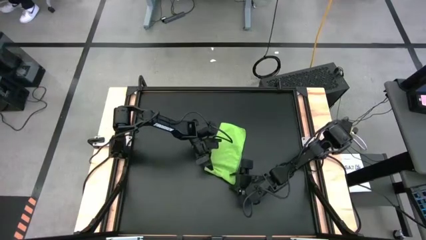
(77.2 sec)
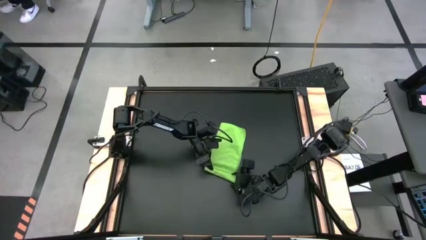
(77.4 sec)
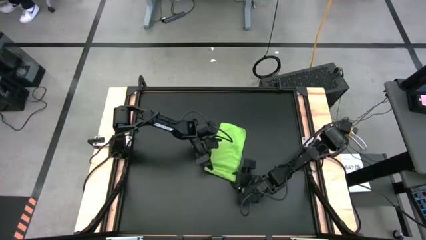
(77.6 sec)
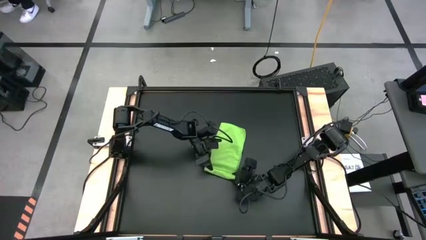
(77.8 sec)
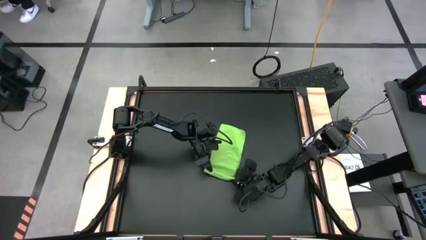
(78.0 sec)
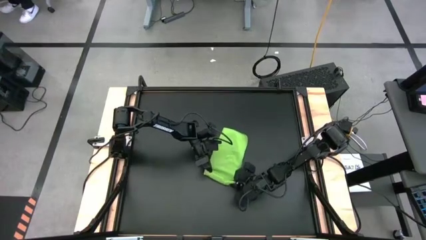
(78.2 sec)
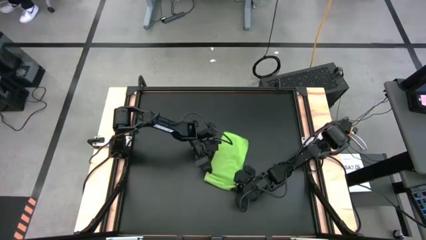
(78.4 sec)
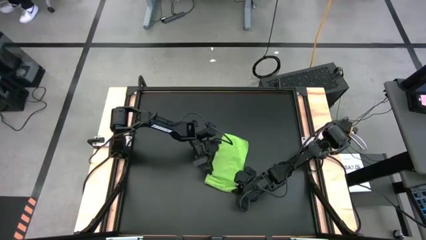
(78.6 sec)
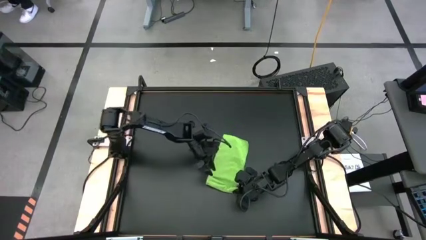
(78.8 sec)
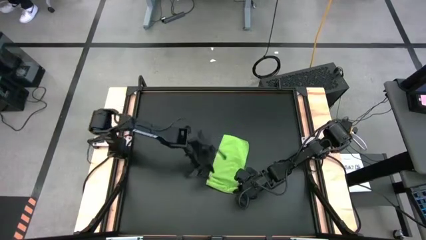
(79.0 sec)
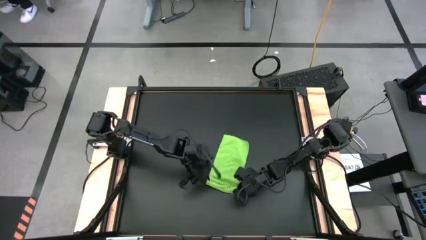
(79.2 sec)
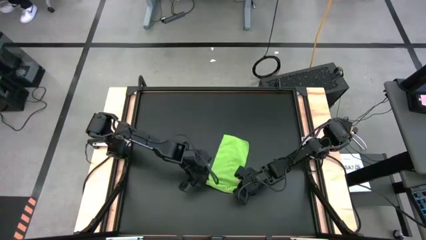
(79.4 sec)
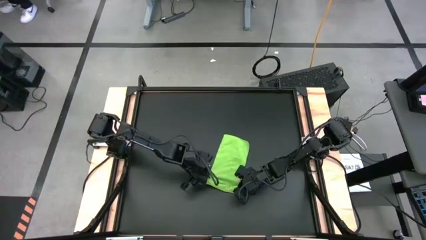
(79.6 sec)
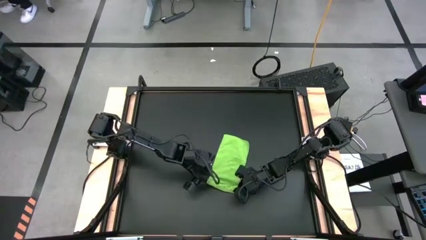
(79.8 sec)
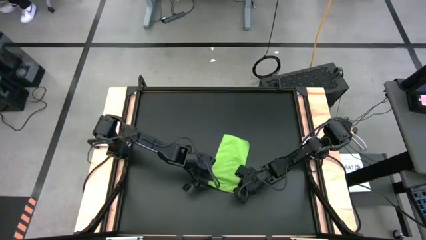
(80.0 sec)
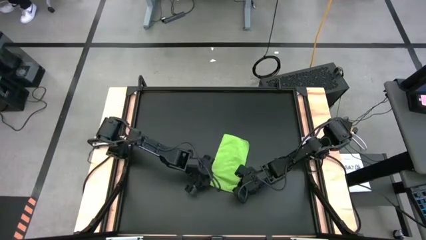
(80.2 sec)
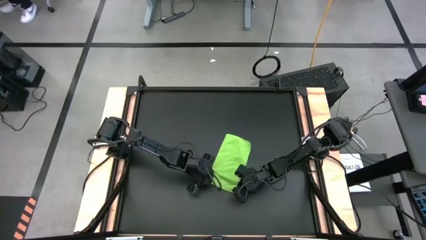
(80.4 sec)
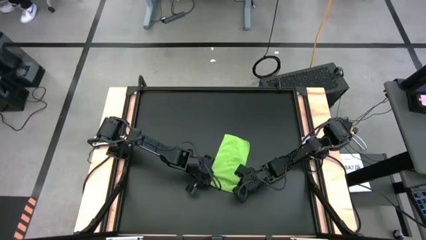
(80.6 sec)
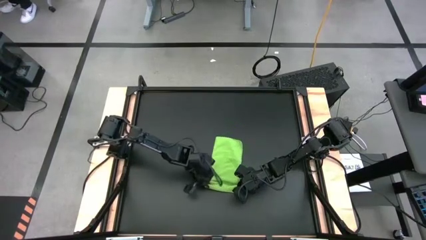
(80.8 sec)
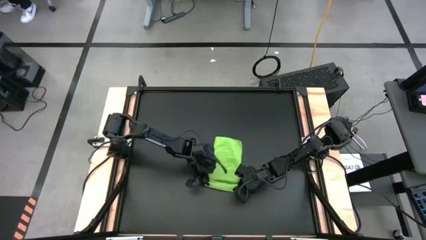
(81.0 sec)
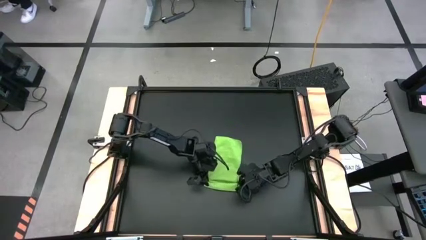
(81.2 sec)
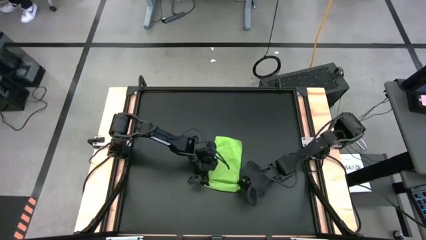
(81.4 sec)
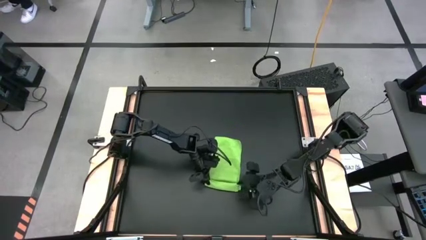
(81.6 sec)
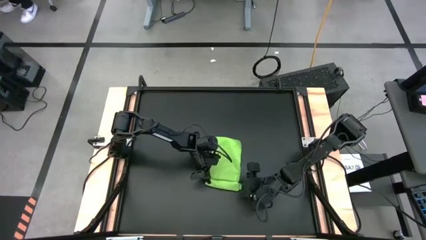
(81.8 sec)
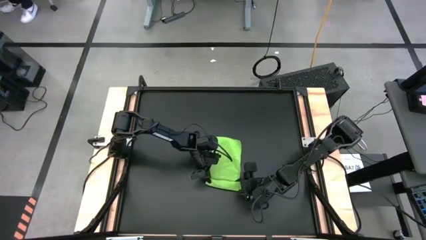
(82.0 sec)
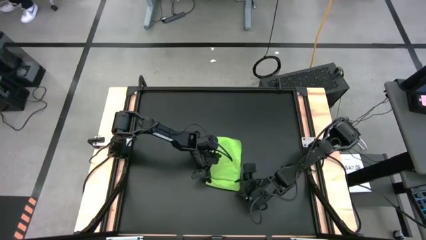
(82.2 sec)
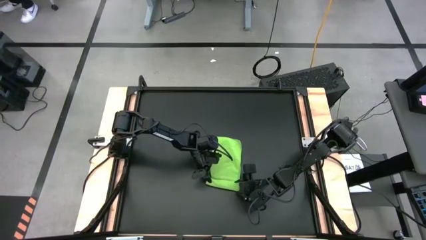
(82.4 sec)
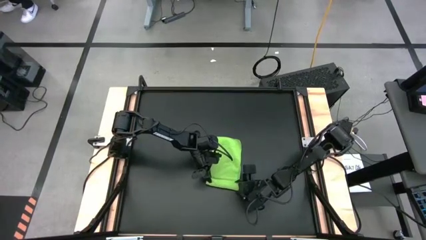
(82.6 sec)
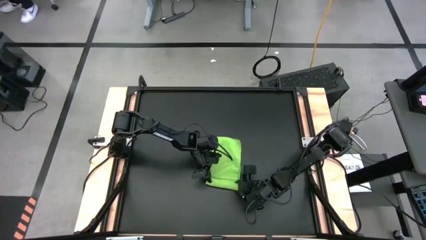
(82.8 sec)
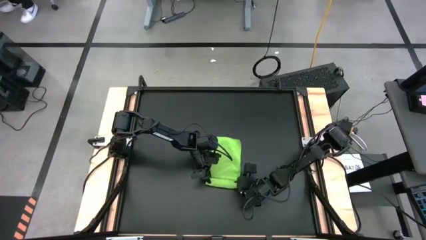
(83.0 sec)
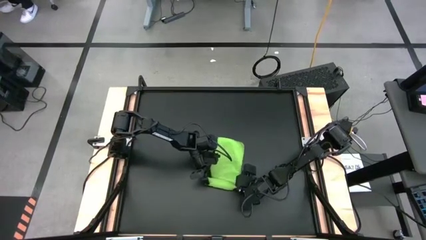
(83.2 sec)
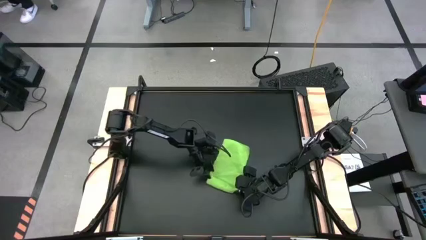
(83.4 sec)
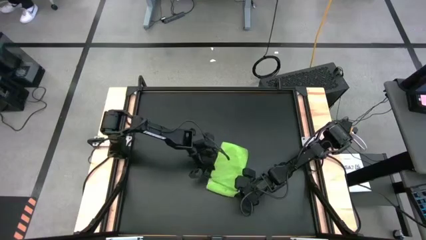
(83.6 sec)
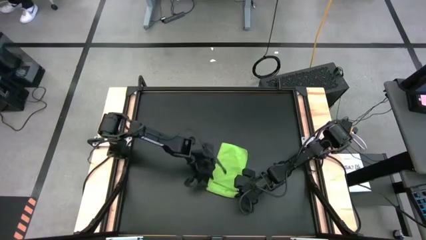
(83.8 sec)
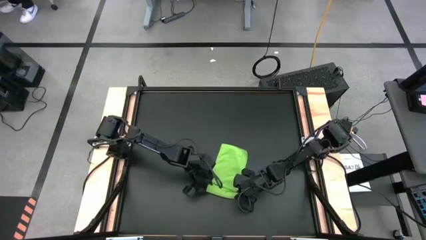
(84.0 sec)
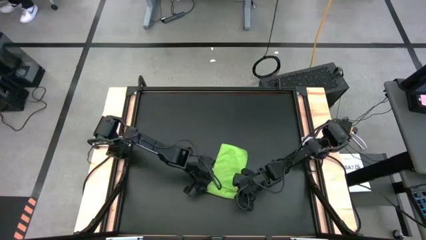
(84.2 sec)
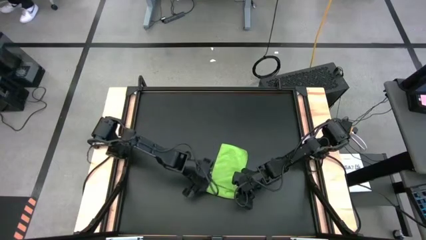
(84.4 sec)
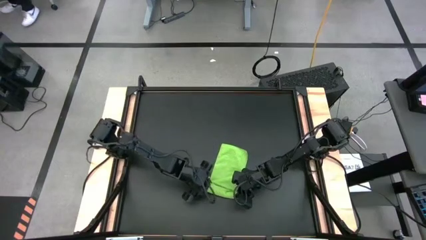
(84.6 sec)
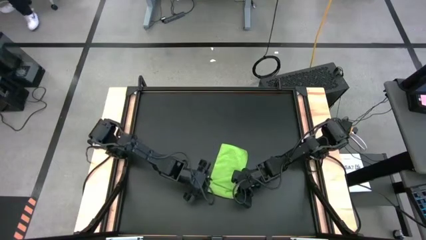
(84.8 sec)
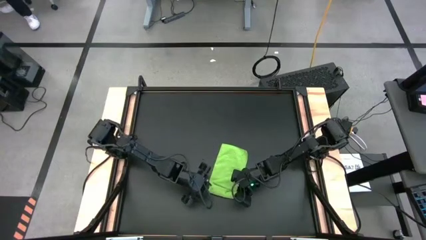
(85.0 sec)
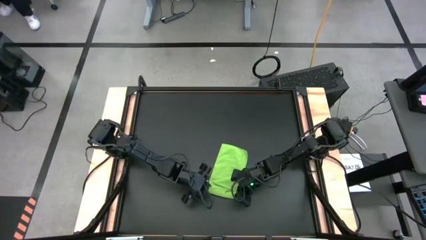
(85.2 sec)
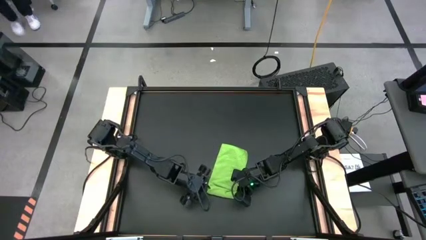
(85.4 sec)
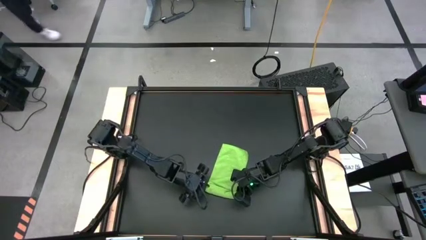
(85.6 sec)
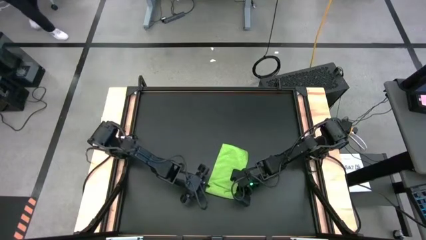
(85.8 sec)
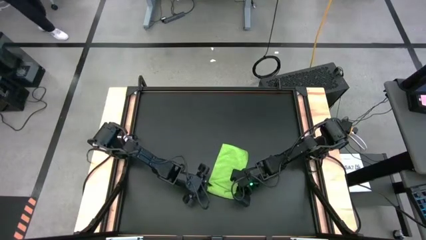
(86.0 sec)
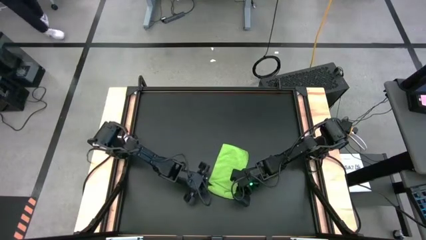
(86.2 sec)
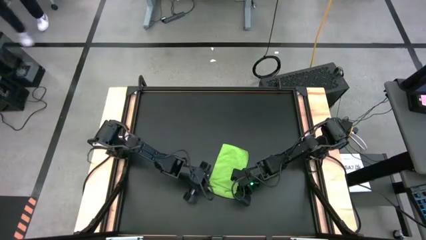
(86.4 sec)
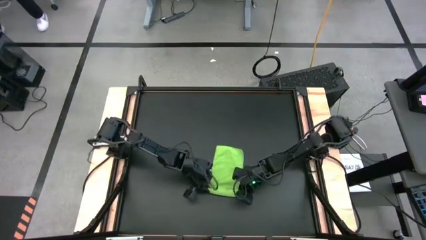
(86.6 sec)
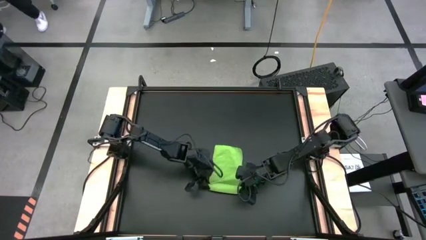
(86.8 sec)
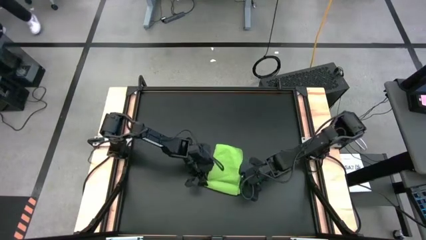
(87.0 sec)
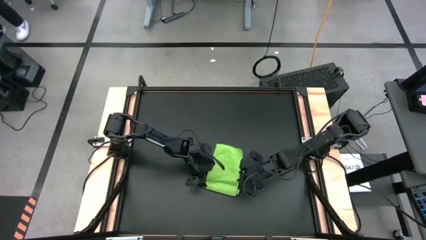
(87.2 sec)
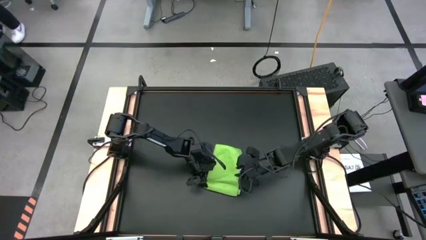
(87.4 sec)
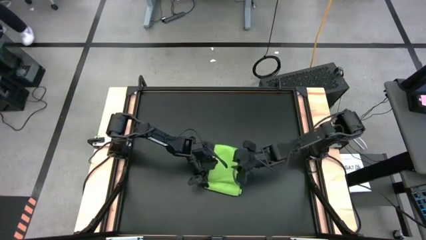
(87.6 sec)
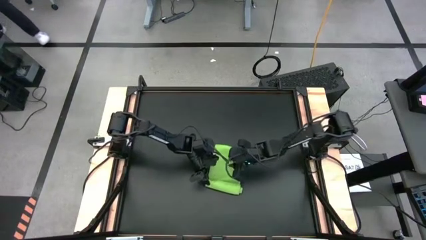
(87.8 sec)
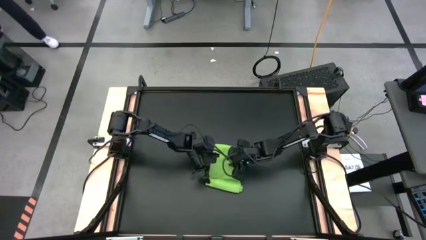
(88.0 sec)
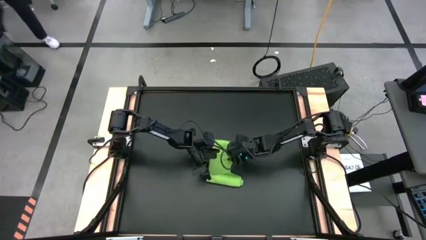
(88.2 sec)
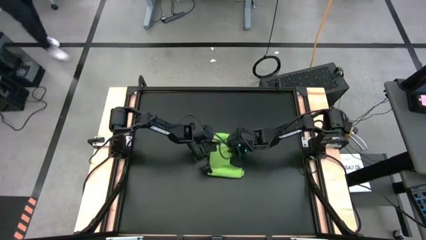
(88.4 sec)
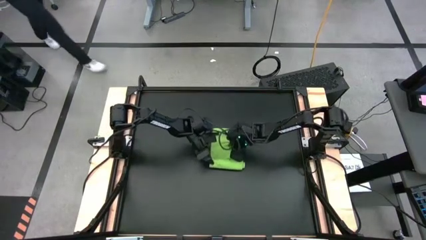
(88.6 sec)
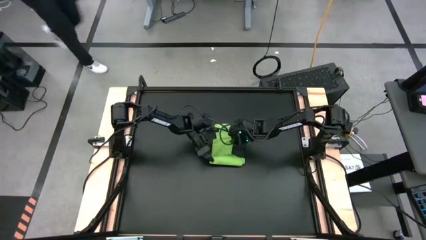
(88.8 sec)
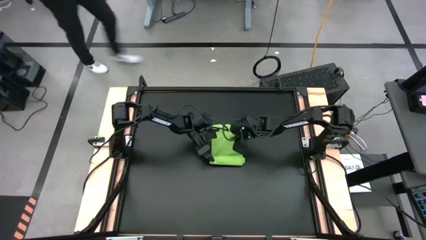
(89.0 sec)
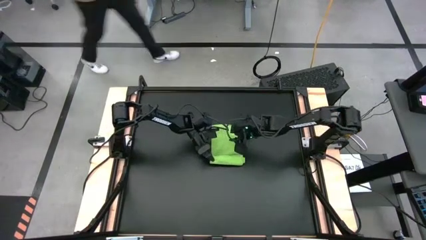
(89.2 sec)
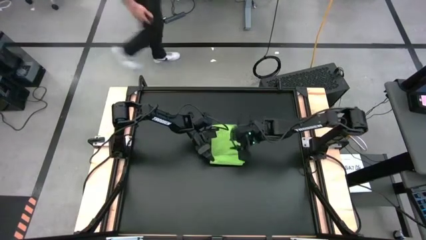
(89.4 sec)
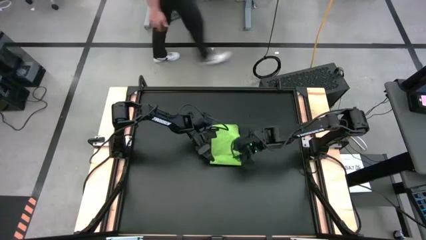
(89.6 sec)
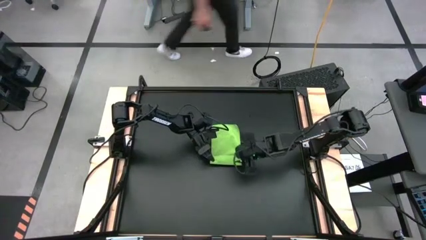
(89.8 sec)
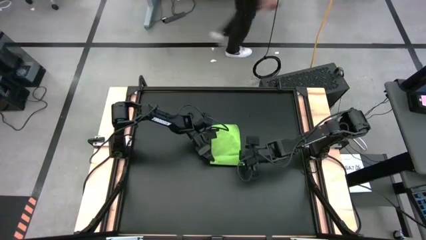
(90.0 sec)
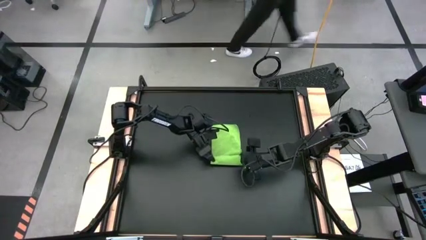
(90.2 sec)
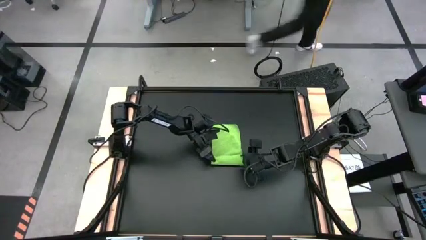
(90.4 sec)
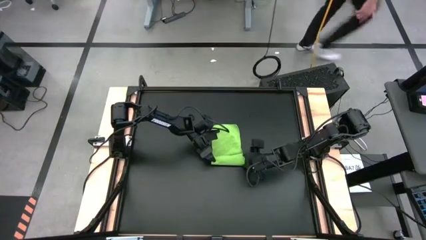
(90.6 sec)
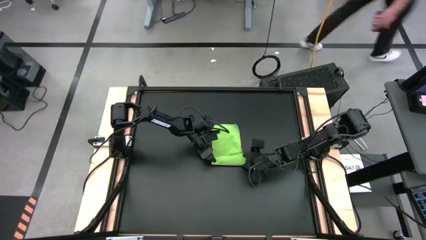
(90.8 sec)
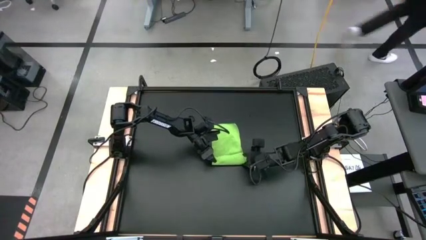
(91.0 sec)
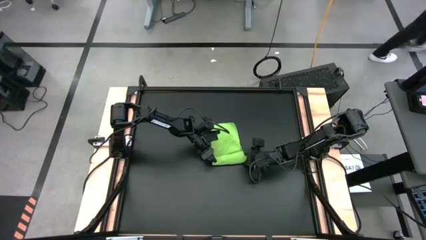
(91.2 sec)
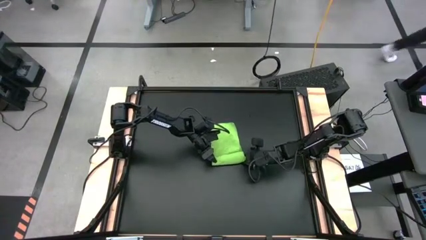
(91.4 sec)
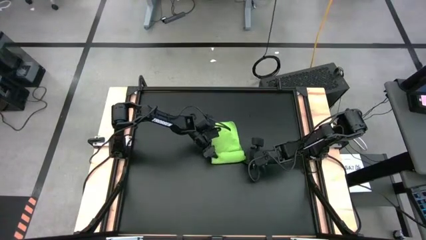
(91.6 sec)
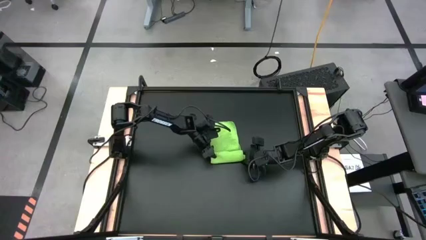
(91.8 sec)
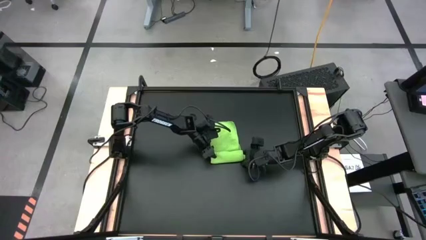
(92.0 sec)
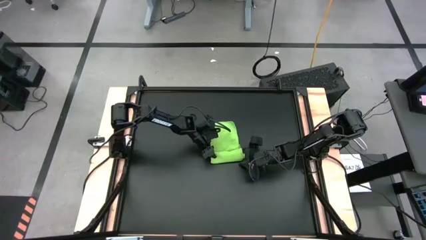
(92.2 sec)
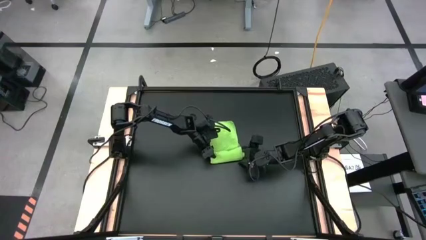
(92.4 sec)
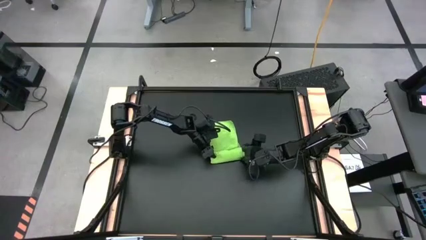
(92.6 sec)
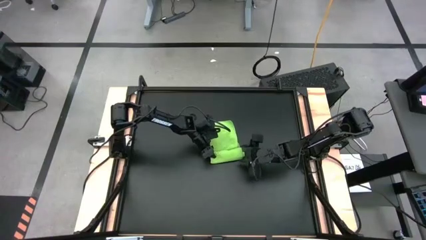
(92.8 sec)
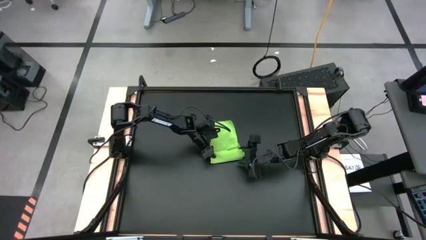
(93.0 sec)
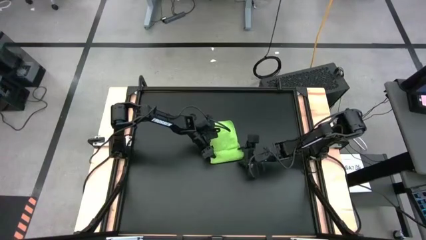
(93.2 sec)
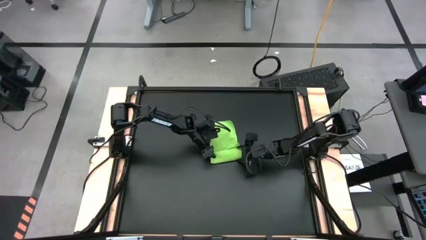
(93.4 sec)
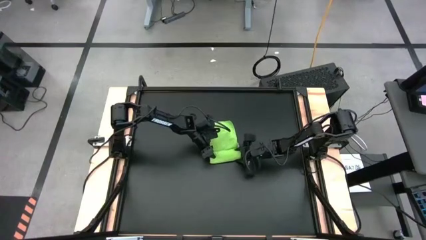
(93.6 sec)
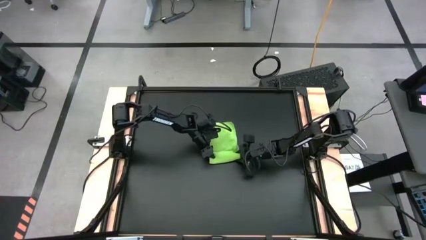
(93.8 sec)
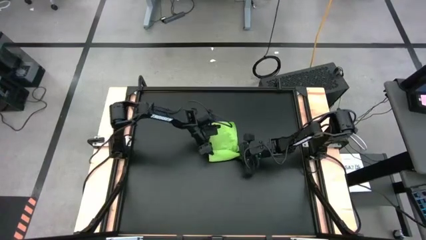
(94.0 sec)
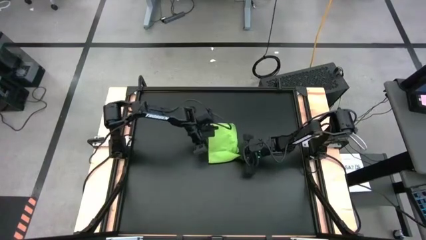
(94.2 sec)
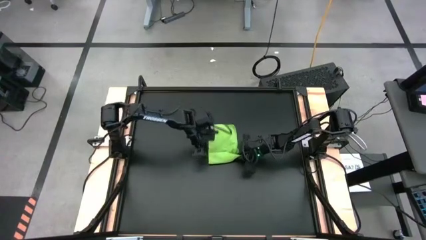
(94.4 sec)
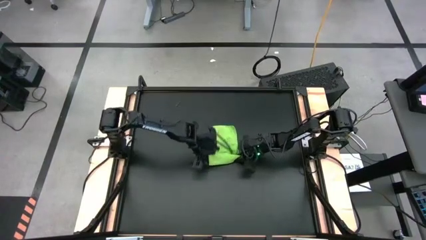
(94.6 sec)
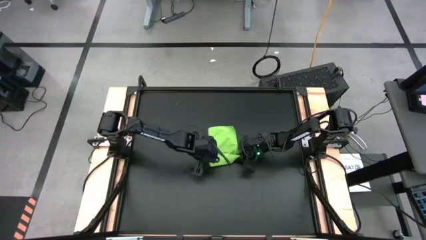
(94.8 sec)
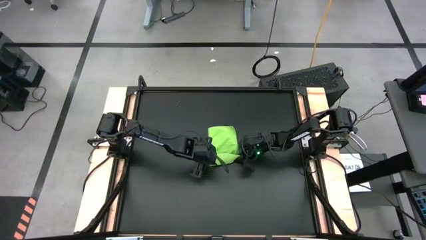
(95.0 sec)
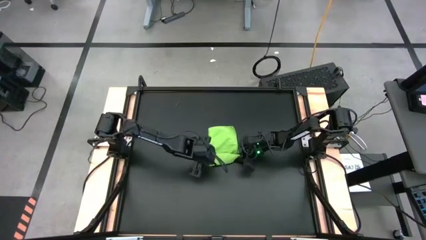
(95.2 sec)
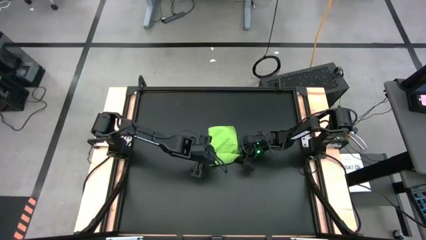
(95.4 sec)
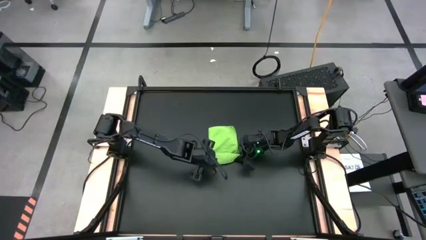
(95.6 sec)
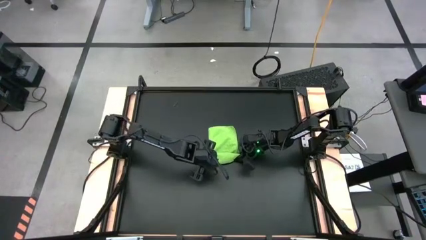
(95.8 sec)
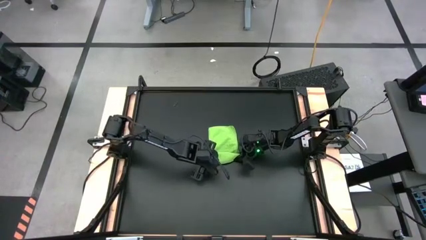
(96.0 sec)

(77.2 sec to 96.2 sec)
Task: Roll towel into tight, uniform cylinder
Roll the green towel
